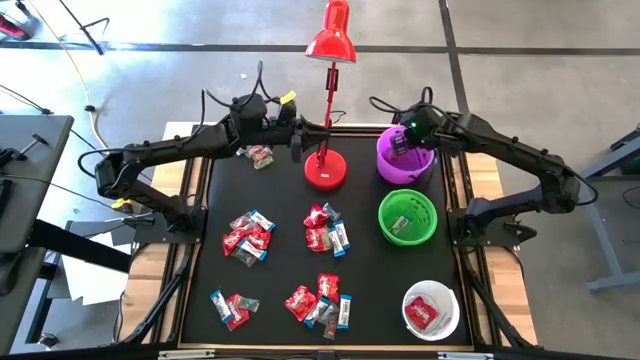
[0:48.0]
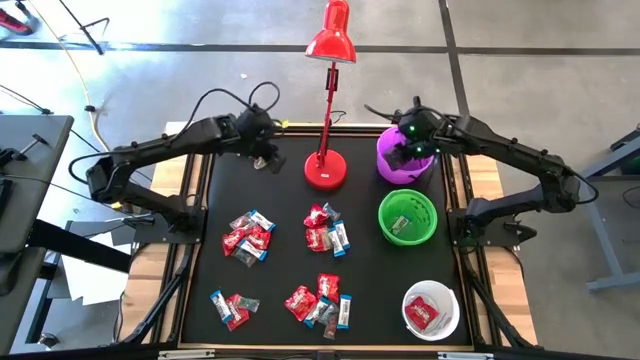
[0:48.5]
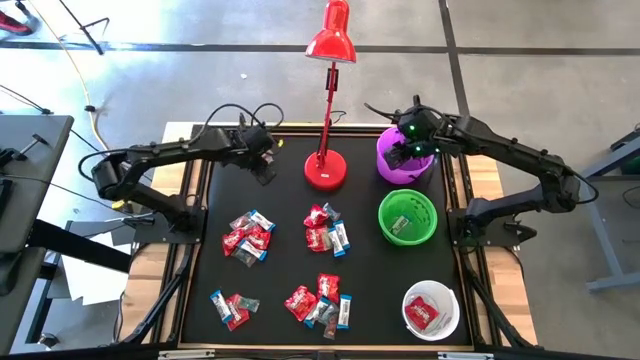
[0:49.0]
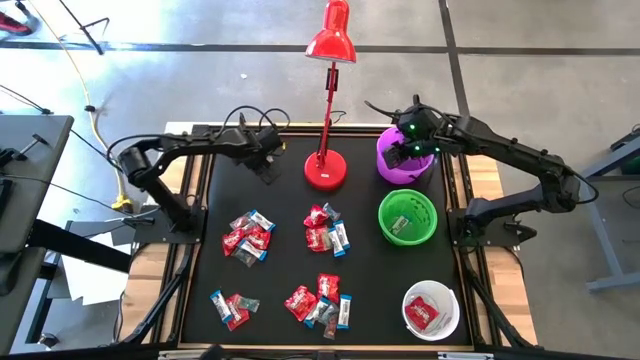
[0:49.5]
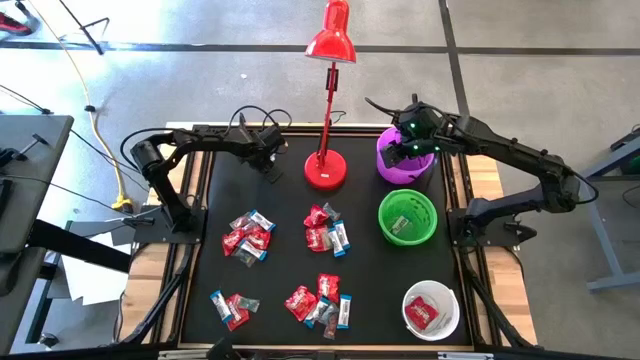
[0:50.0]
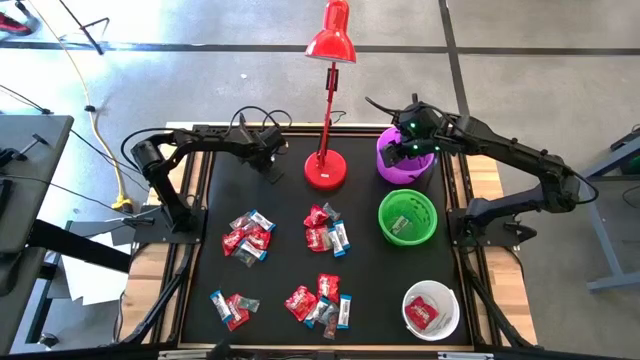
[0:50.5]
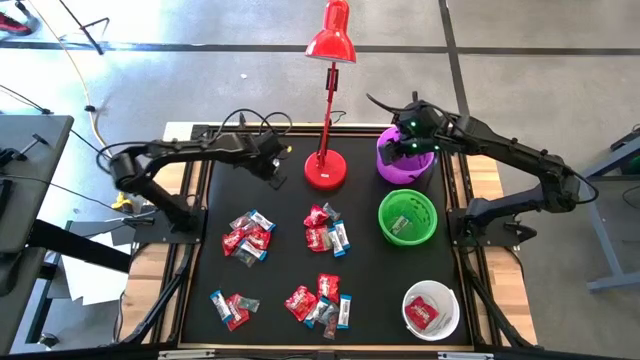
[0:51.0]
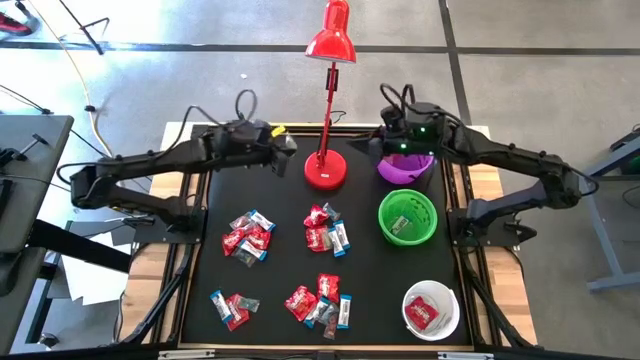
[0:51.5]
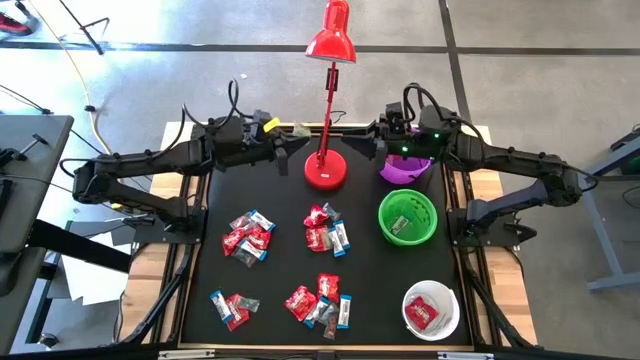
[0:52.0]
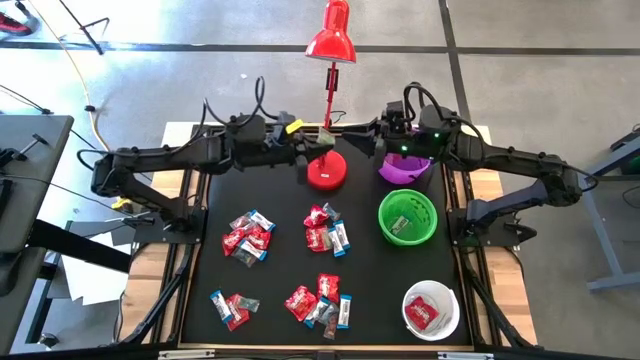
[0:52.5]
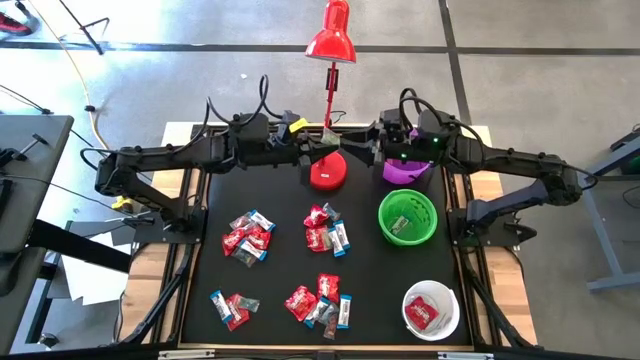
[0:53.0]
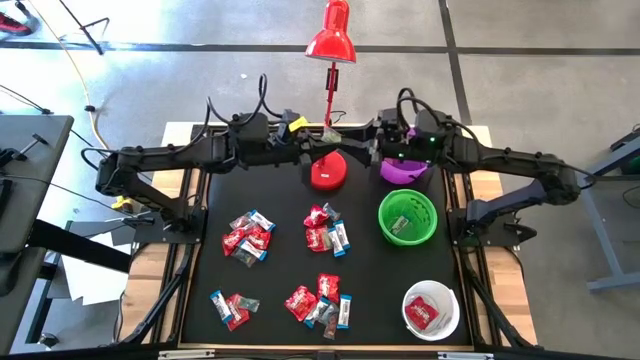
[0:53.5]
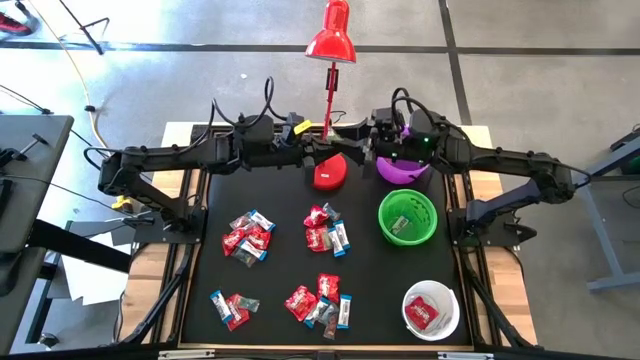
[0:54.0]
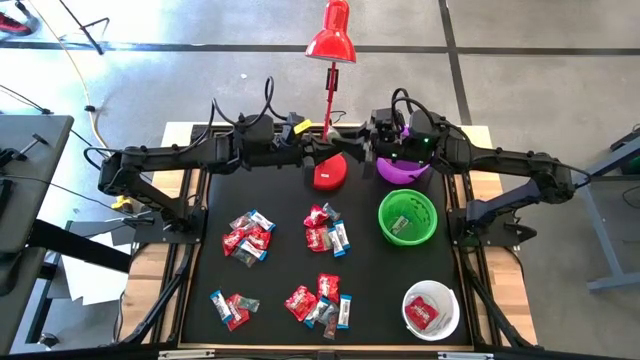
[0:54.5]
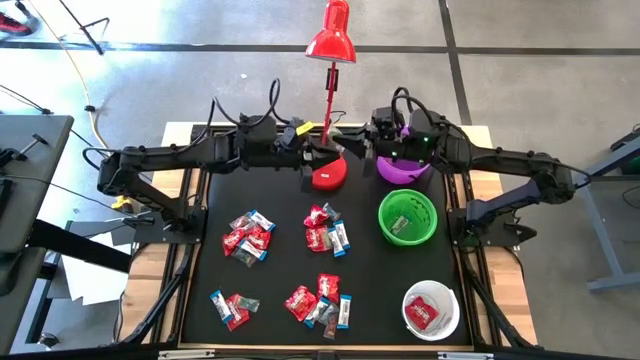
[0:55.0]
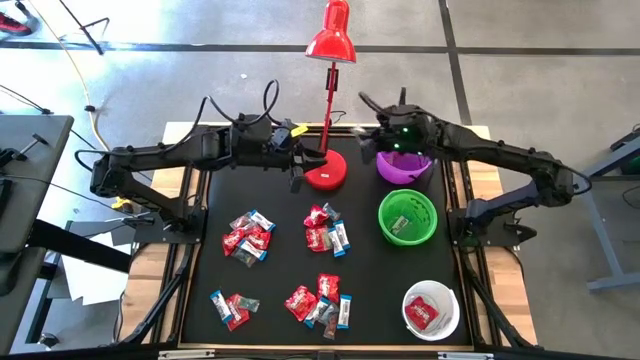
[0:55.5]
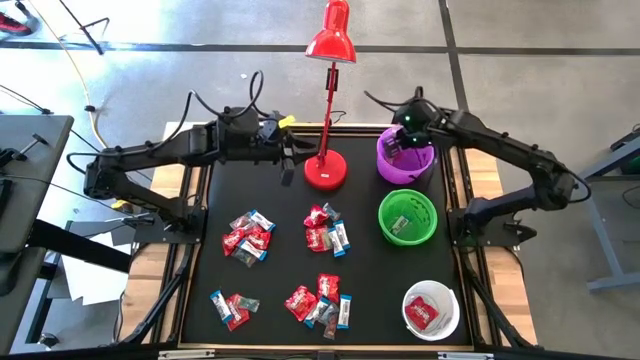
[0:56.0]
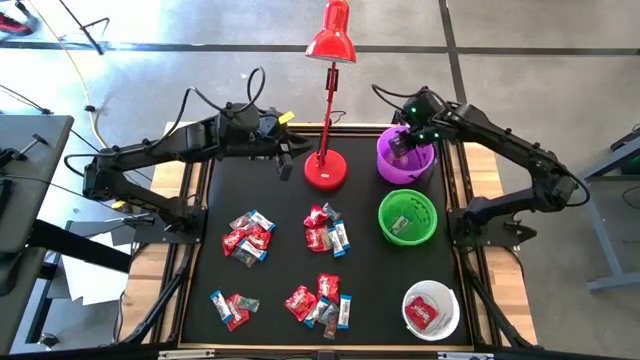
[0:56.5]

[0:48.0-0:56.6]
Task: Organize candy in baskets
Put the green gummy into the violet bucket

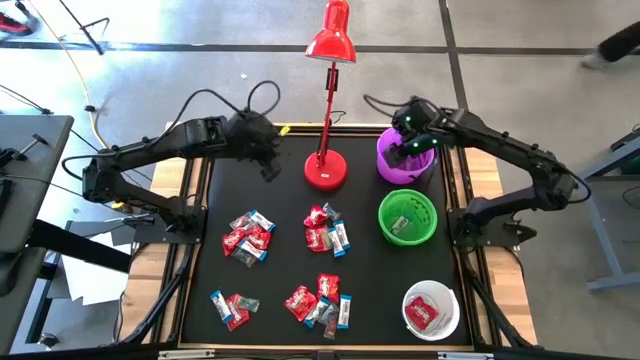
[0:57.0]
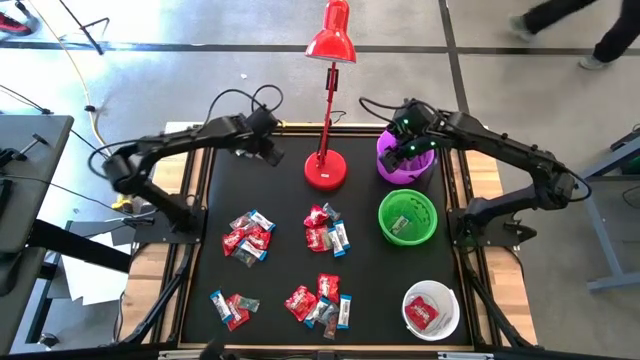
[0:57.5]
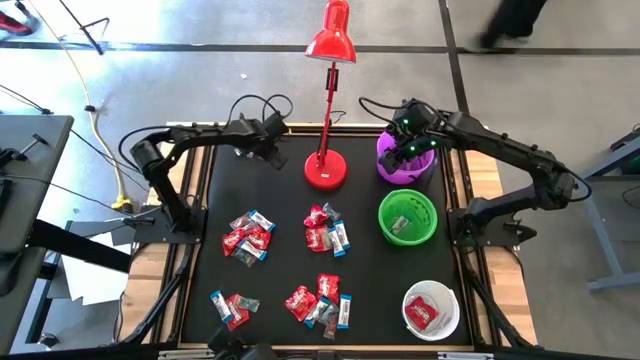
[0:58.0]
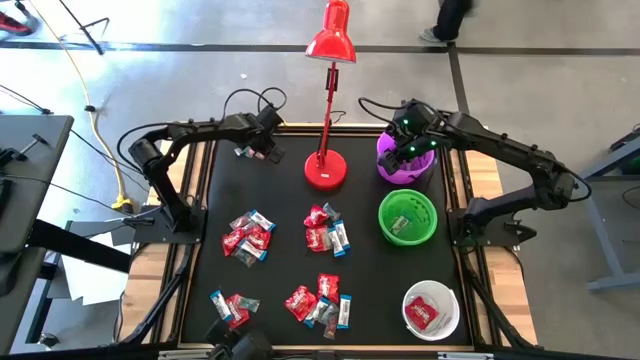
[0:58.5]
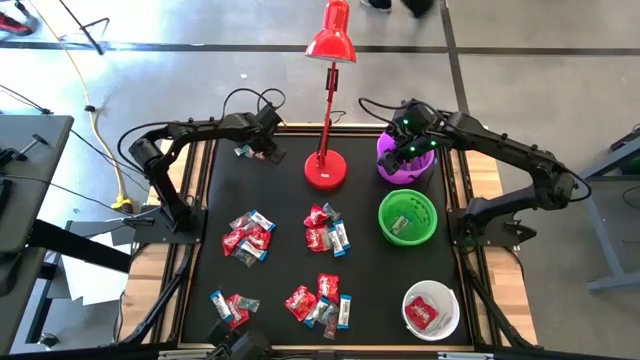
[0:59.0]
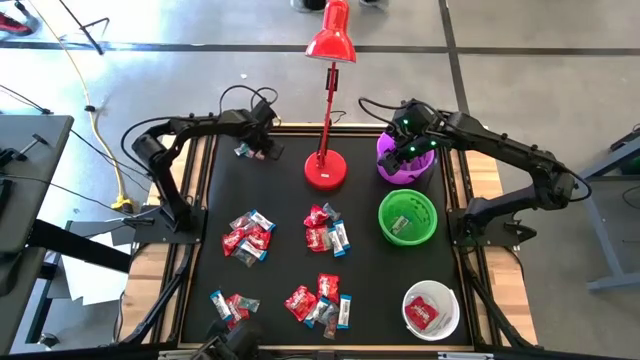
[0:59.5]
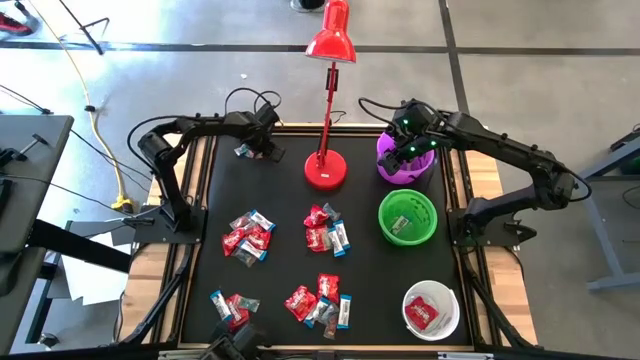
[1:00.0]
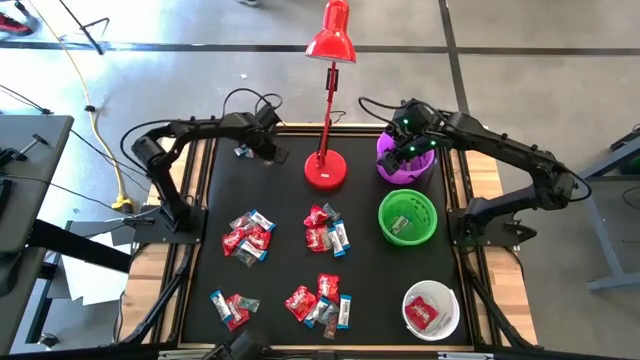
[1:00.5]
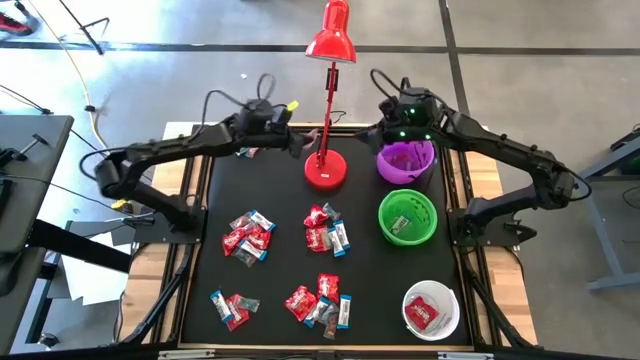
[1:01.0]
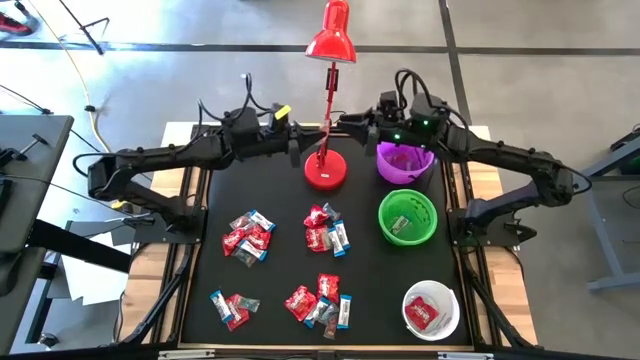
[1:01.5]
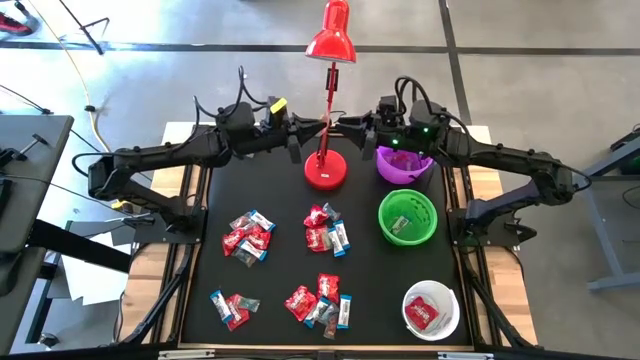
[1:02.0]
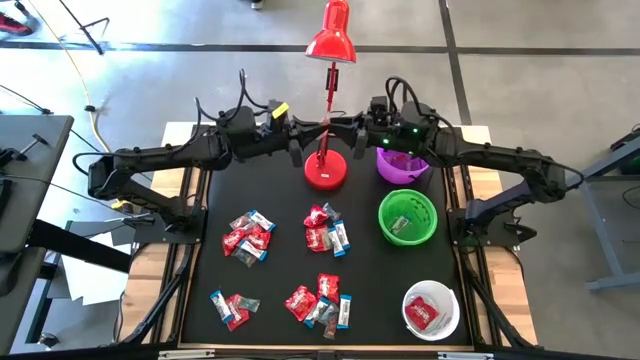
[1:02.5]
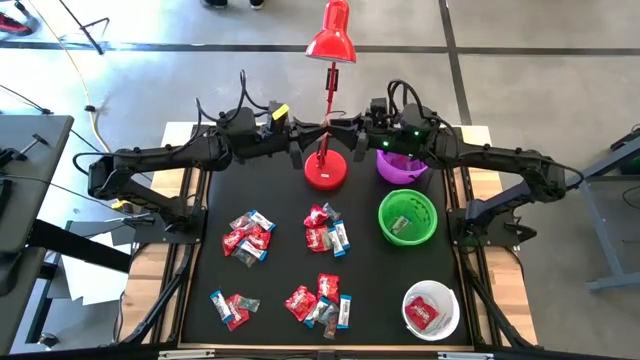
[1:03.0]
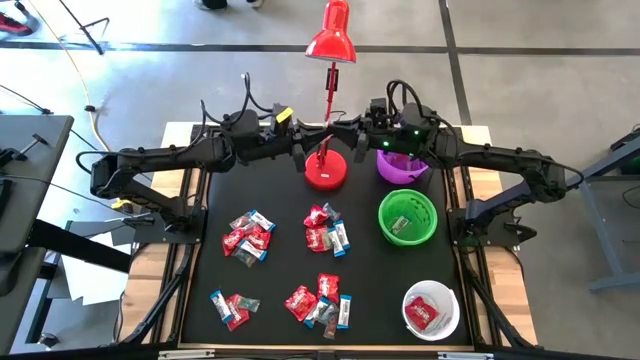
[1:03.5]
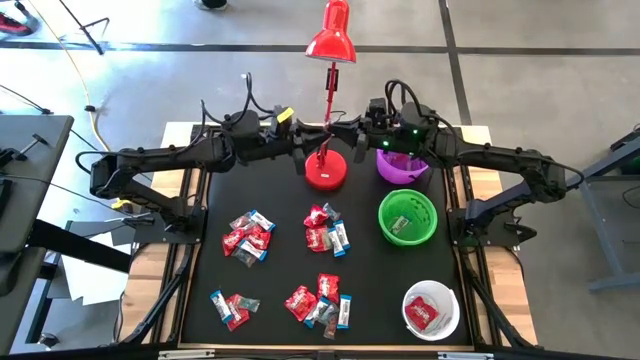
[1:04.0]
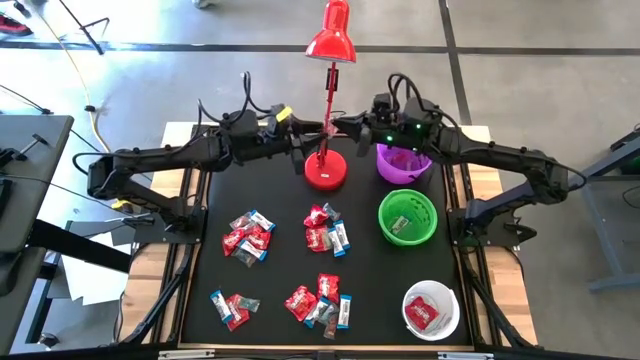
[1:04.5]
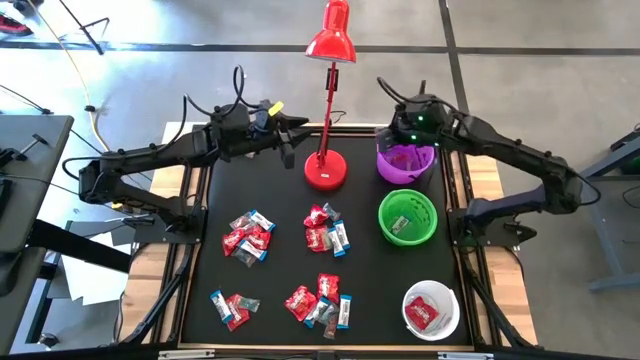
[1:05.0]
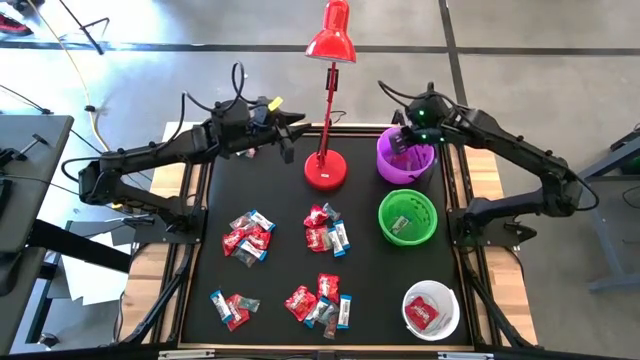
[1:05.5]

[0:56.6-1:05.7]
Put the orange gummy into the violet bucket

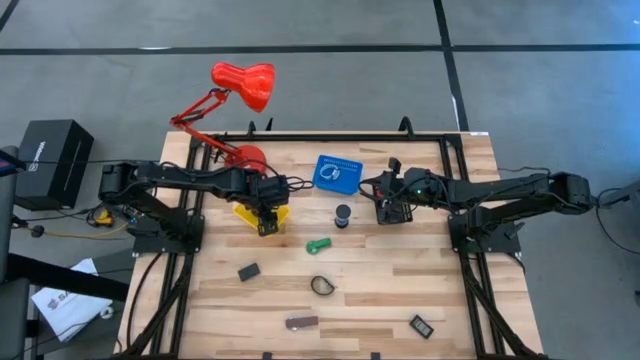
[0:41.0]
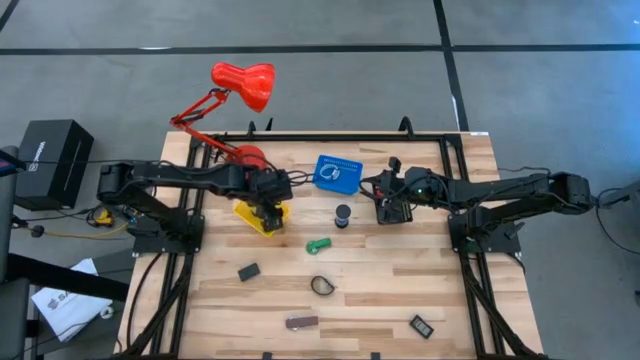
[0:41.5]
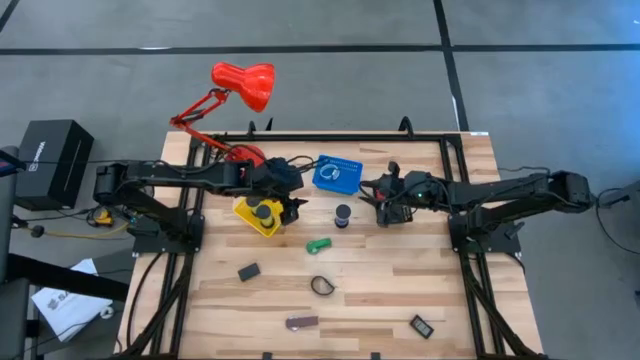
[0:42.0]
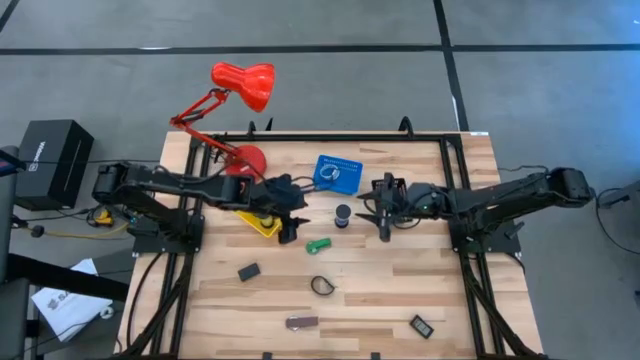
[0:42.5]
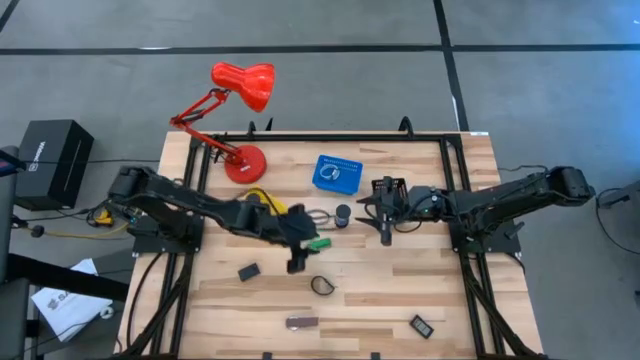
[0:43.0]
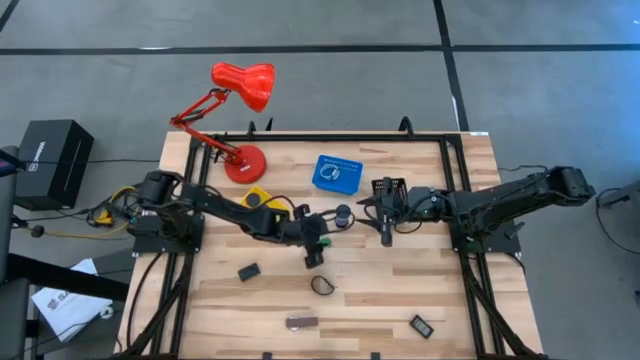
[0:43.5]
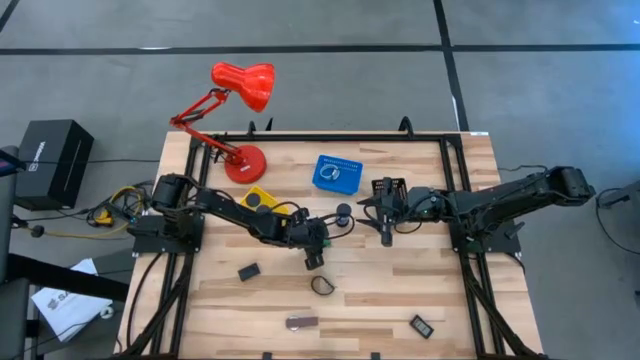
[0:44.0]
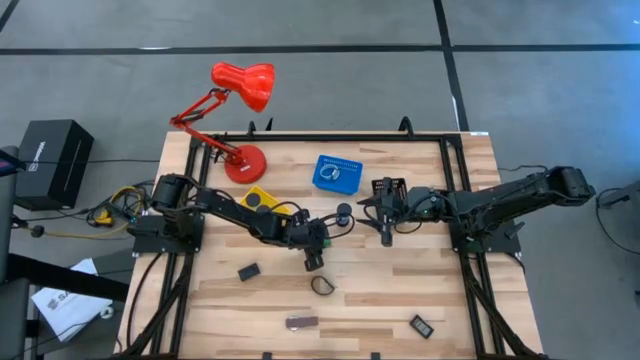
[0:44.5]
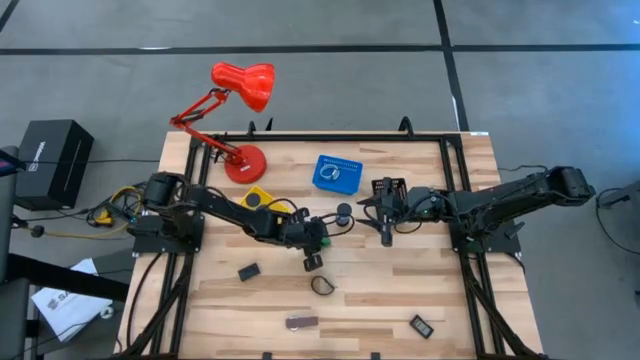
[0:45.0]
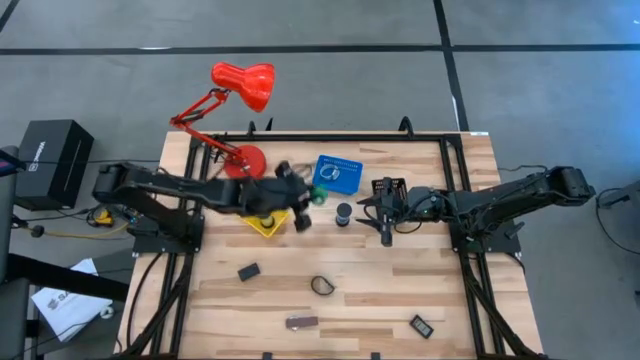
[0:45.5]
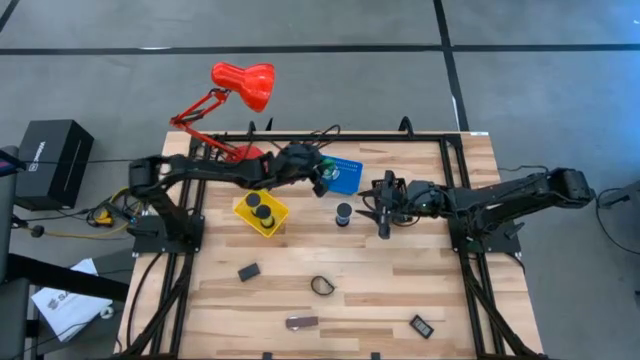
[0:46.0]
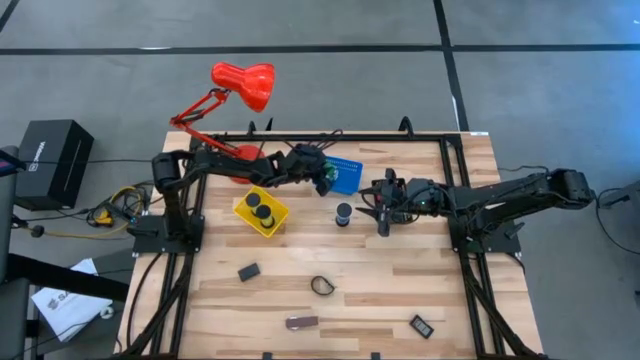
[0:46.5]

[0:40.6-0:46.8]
Task: Pick & Place Office items
Put the green wrist watch into the blue bin
